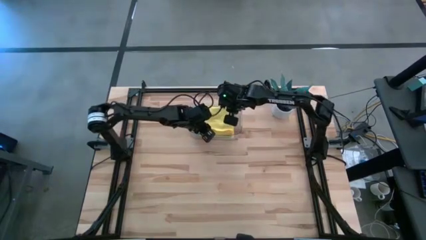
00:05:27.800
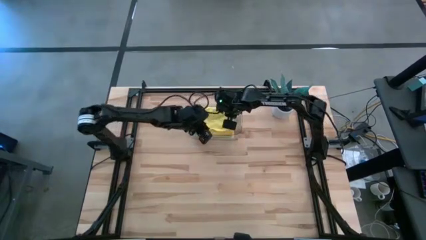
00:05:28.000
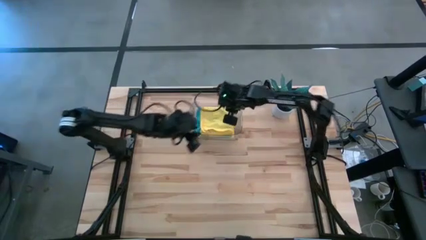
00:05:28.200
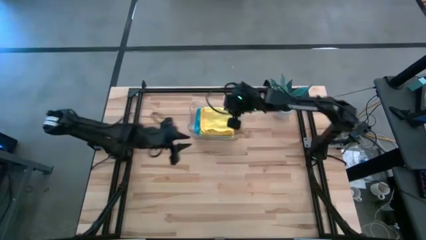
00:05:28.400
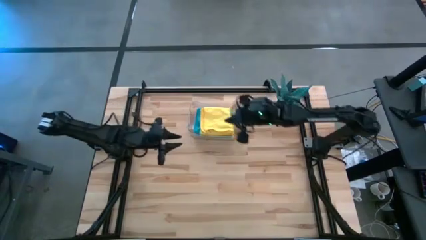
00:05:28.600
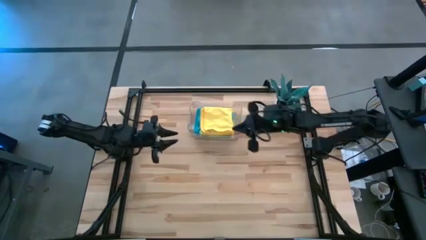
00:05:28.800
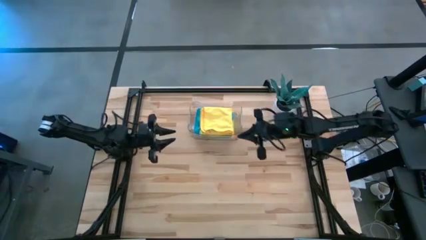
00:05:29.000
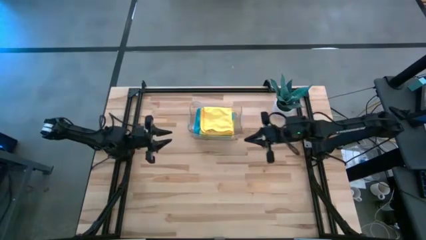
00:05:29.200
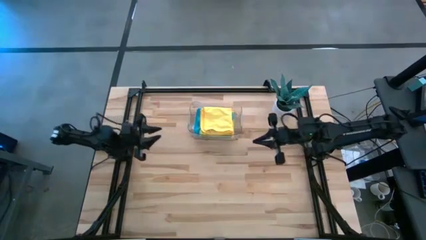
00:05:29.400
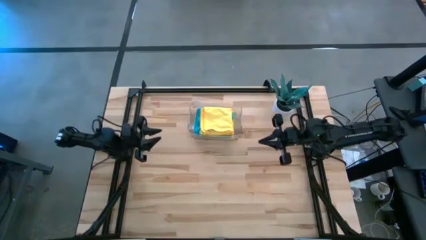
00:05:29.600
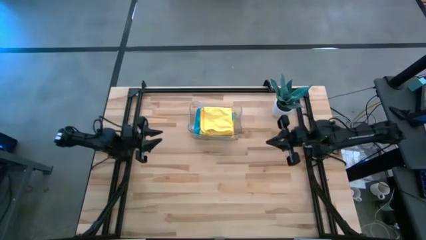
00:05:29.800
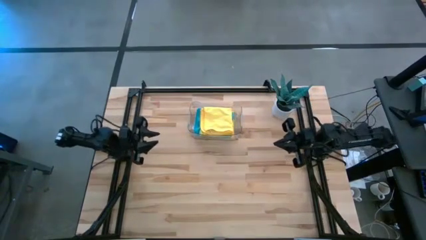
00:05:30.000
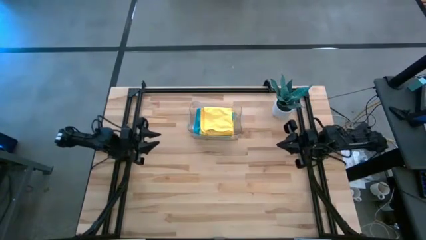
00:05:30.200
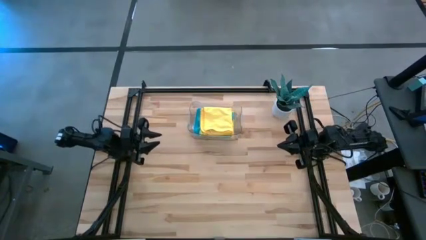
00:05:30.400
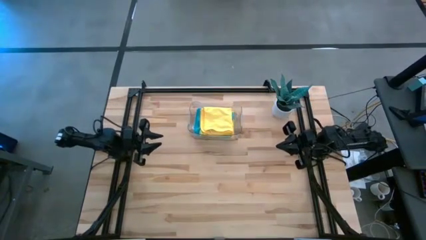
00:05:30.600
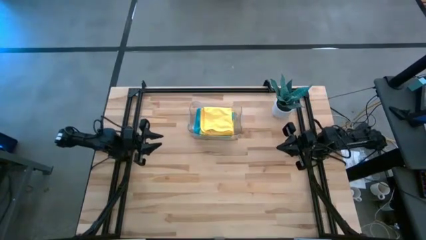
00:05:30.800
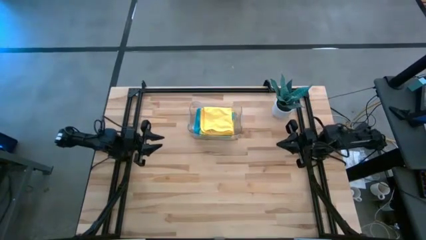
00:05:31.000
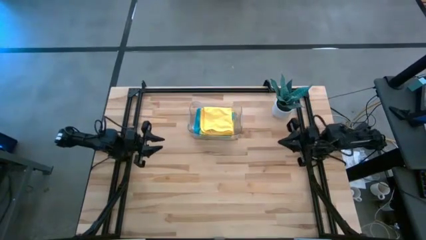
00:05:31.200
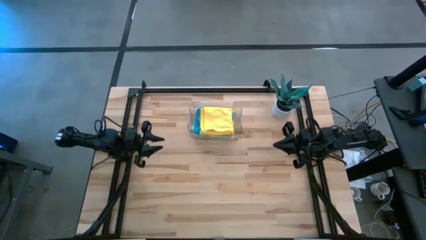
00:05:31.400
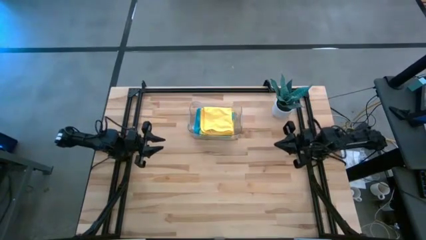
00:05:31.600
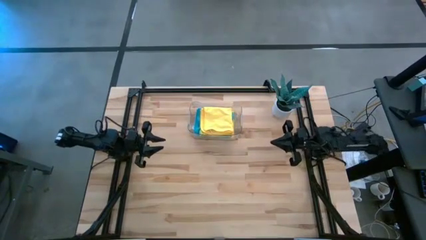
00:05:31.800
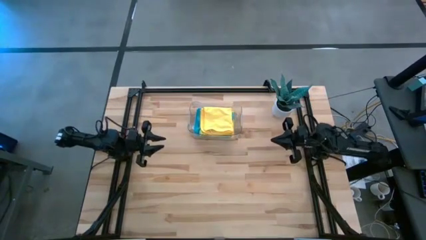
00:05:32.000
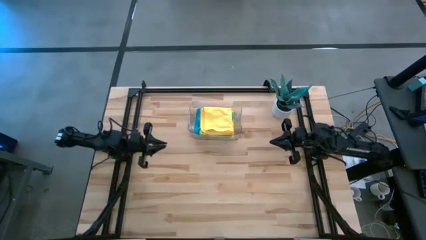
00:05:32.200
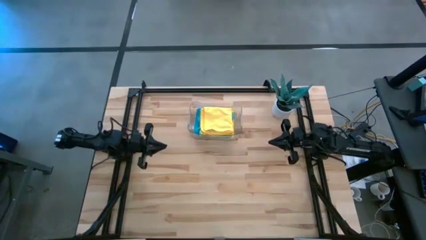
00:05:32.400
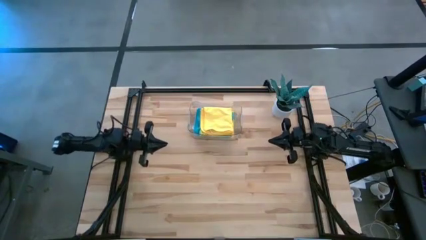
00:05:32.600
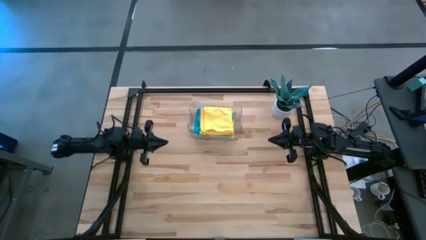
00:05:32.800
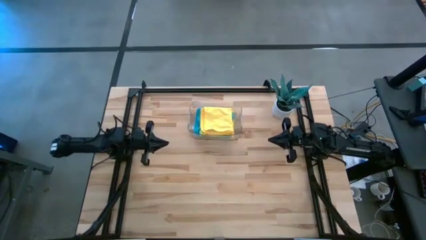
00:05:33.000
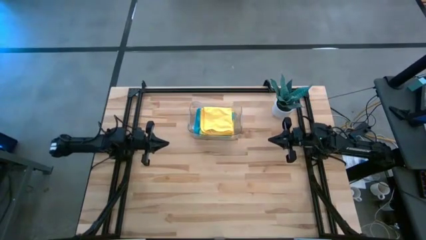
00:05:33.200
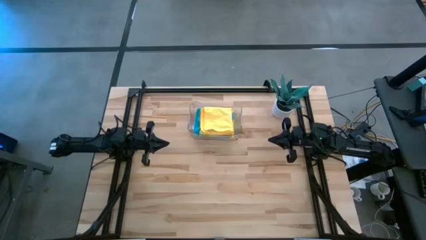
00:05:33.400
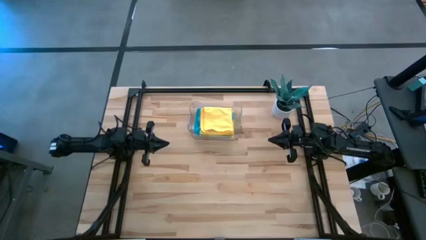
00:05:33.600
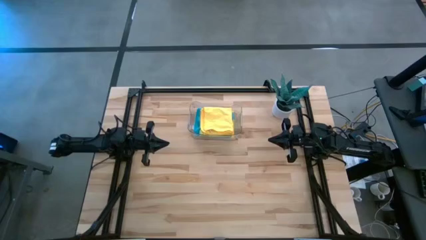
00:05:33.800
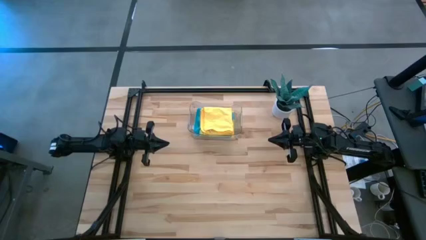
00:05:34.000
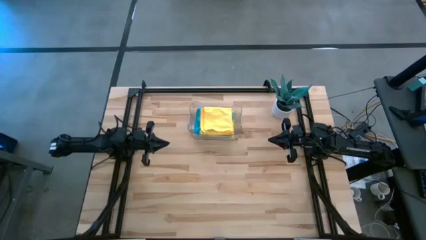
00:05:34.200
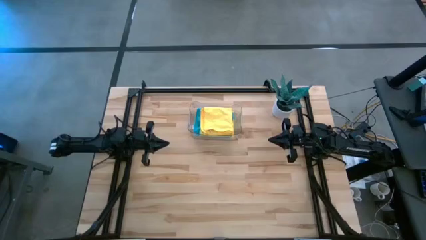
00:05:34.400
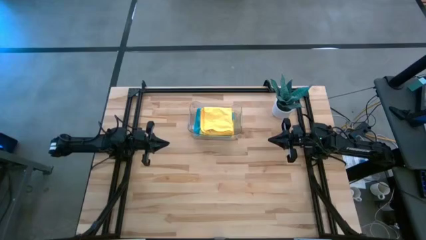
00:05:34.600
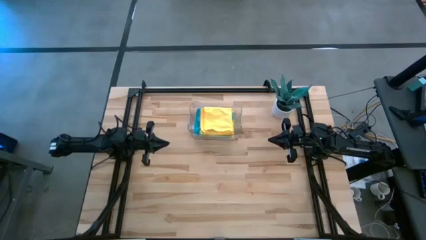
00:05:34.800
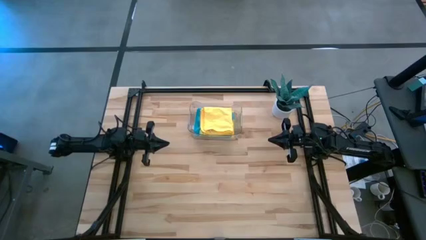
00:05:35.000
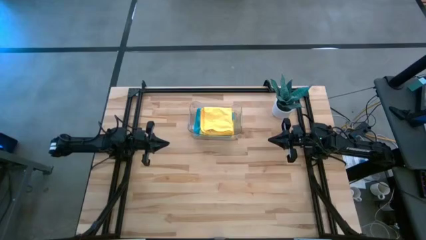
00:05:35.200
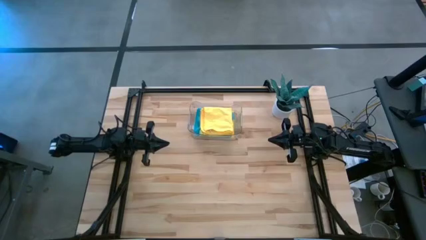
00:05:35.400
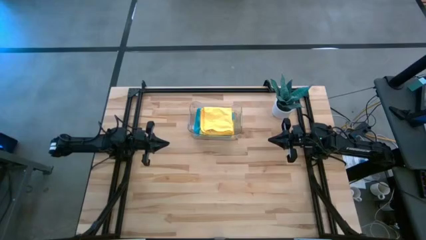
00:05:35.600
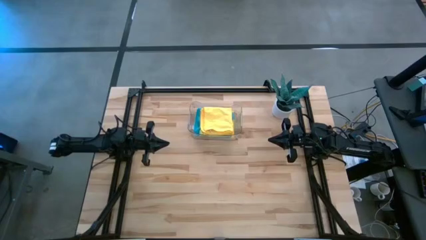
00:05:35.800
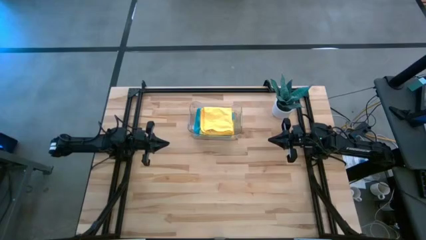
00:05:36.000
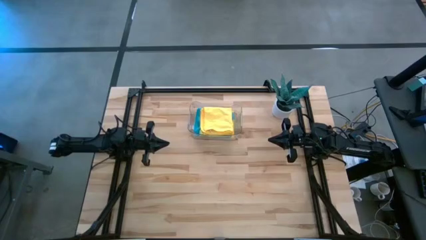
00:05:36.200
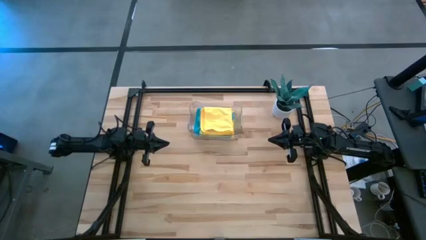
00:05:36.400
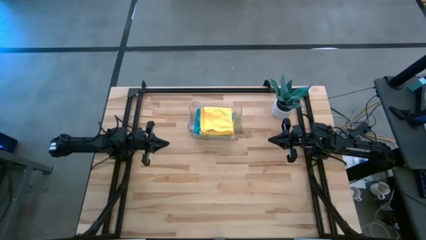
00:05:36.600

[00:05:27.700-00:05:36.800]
Task: Fold microfiber towels
Return to Home Position

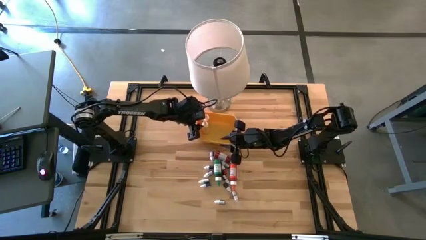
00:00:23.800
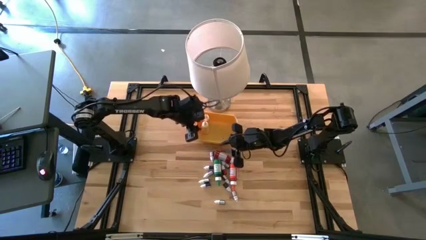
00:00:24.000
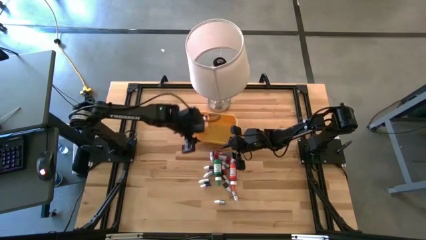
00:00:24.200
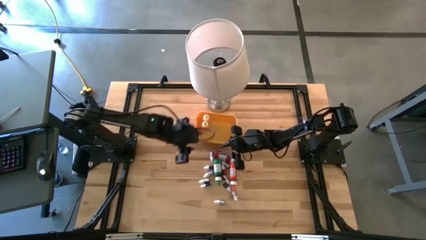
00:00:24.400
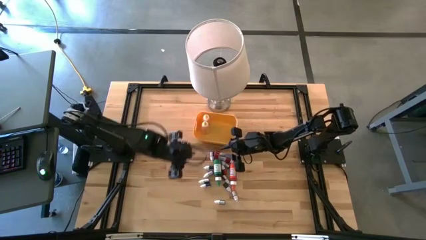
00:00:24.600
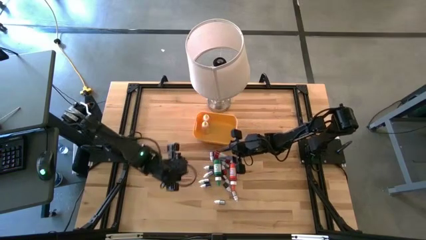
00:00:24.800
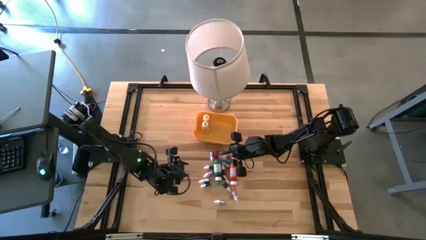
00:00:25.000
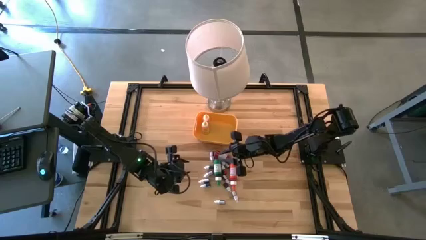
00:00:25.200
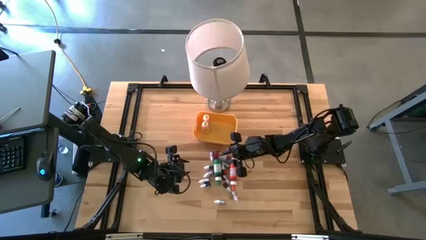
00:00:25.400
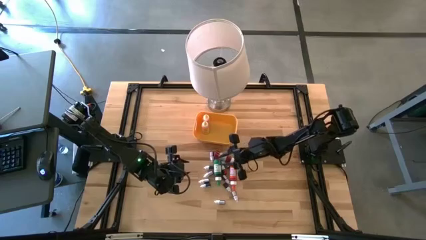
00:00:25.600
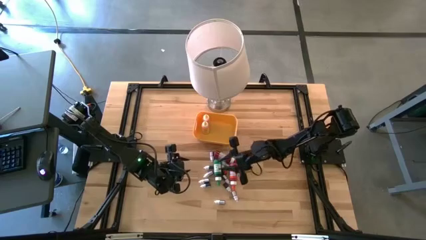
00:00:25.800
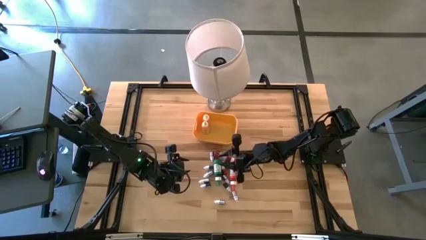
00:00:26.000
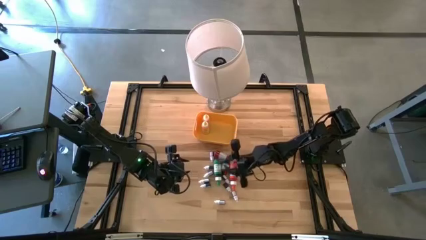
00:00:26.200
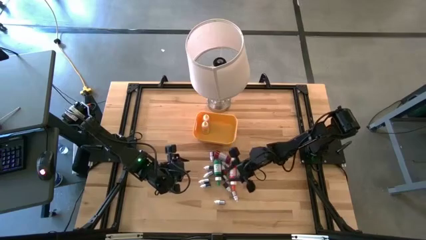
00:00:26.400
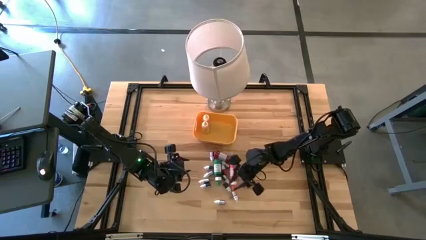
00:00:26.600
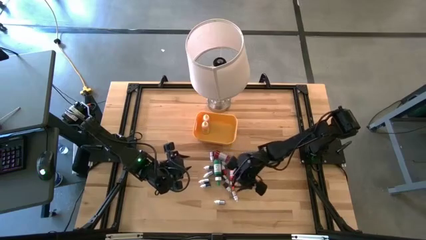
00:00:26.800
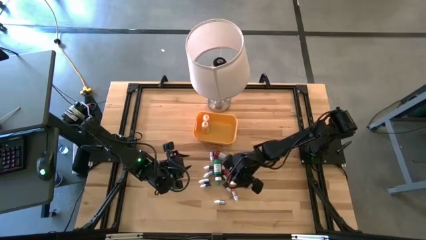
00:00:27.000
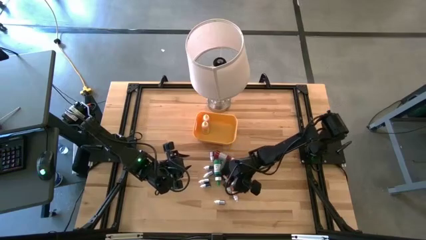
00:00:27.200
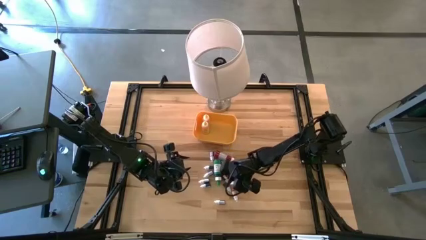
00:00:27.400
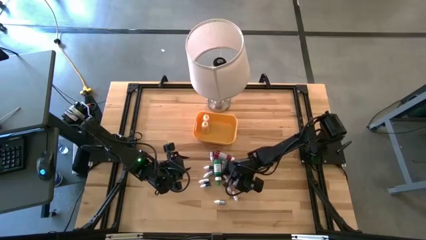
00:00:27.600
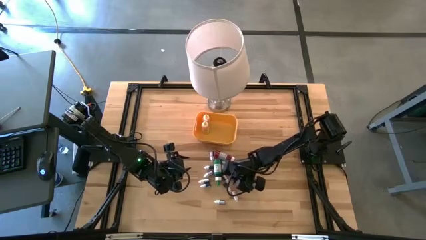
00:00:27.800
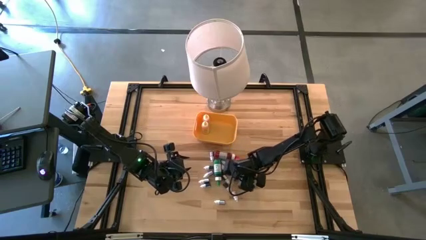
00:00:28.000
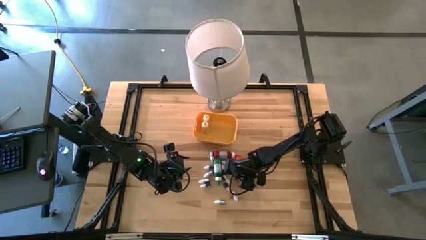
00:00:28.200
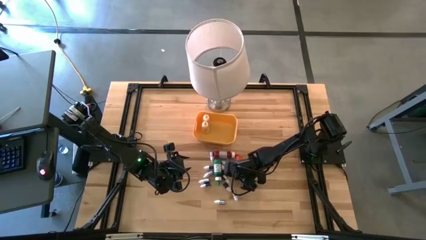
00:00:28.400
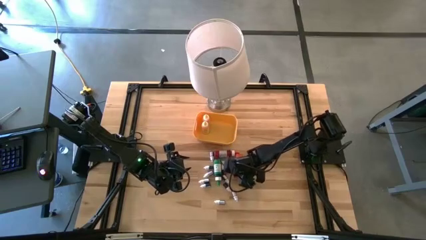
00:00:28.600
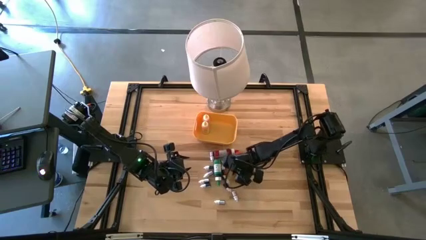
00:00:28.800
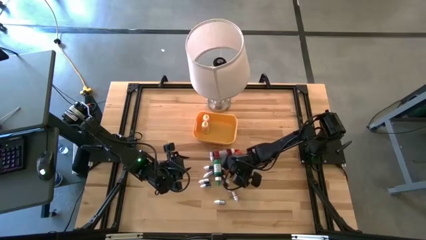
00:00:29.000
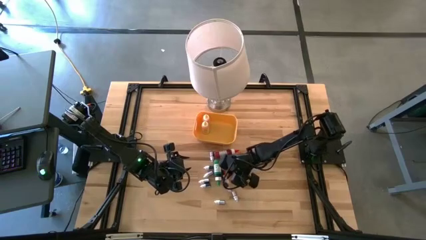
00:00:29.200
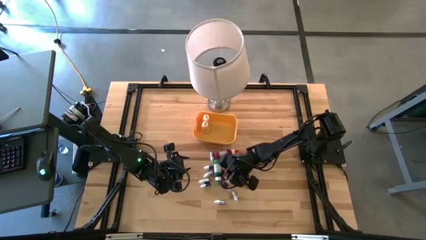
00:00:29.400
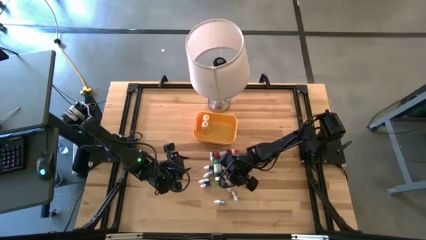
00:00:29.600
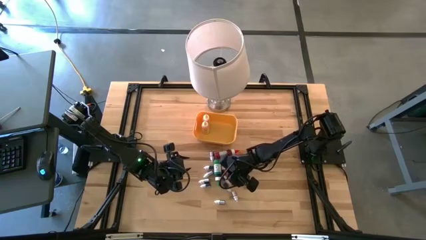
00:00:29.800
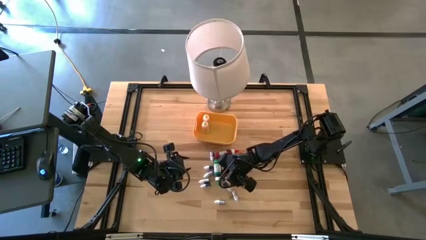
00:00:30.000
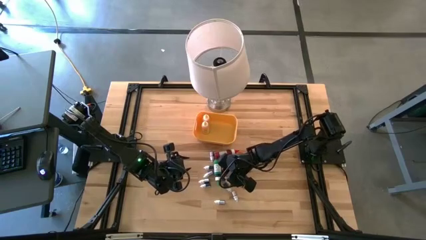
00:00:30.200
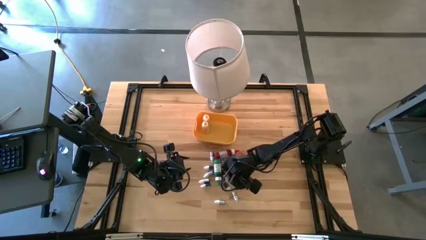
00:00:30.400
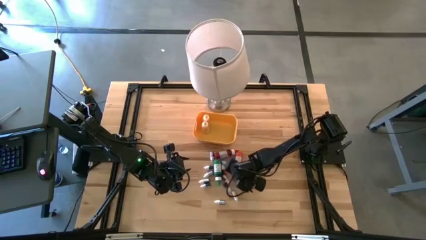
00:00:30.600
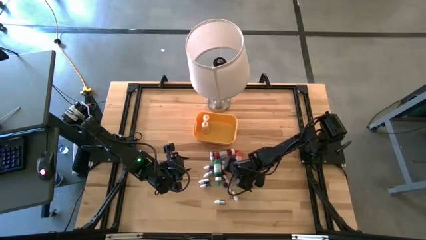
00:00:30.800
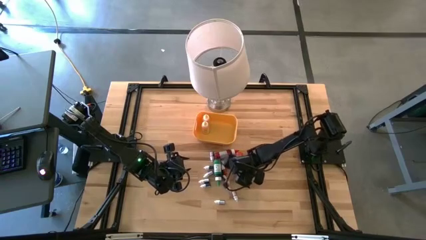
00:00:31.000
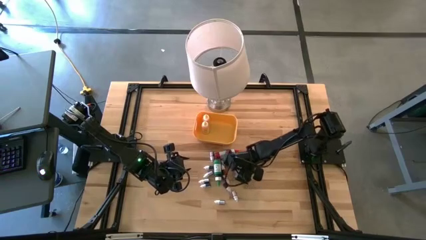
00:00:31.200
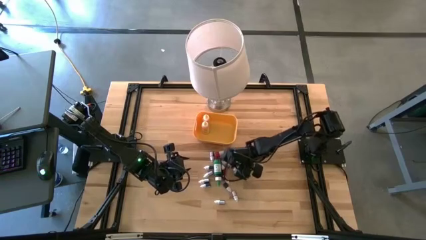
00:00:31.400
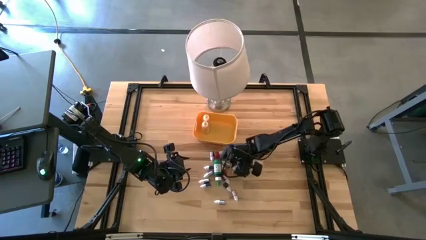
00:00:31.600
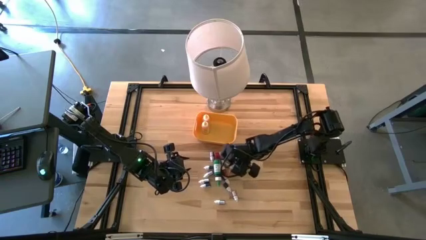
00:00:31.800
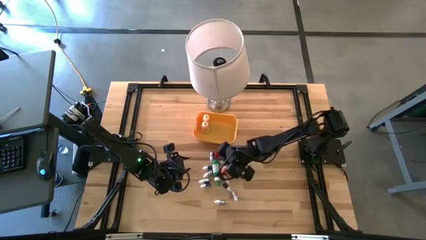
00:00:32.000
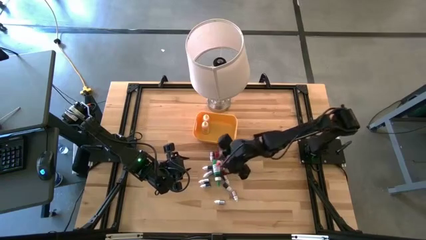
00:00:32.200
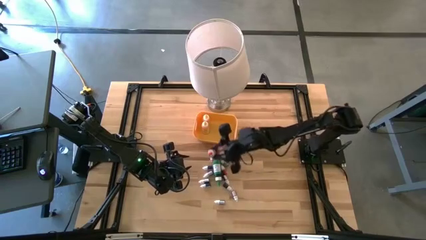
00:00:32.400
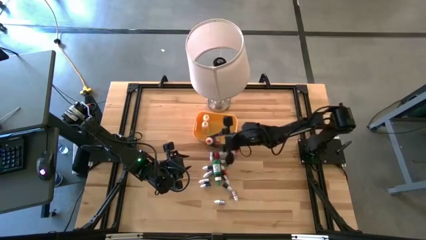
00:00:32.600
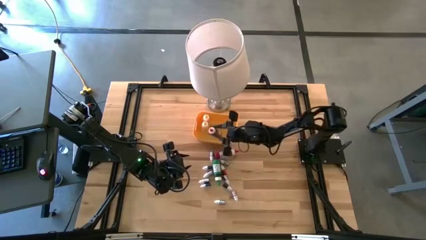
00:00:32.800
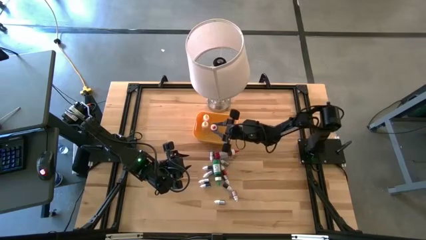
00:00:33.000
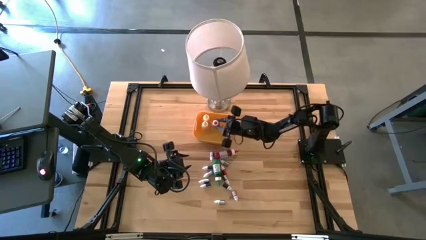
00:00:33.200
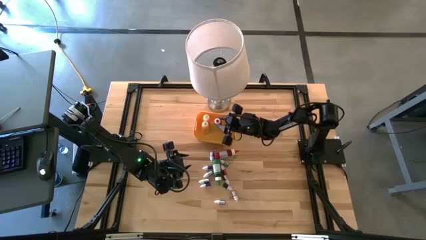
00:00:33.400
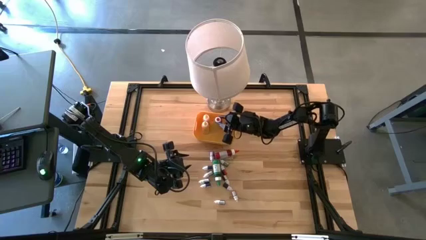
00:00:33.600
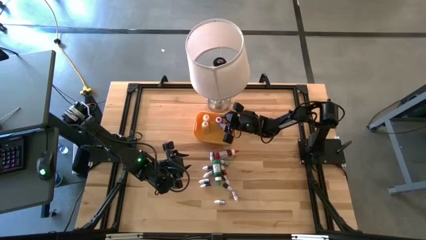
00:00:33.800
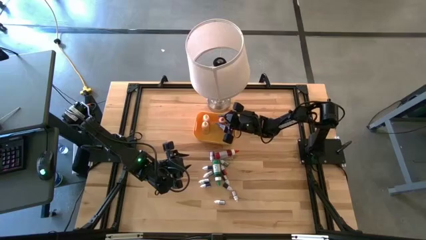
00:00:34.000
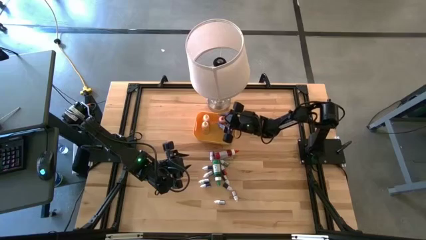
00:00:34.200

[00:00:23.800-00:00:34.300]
Task: Pick & Place food coloring
Put the orange food coloring bottle into the yellow bin
